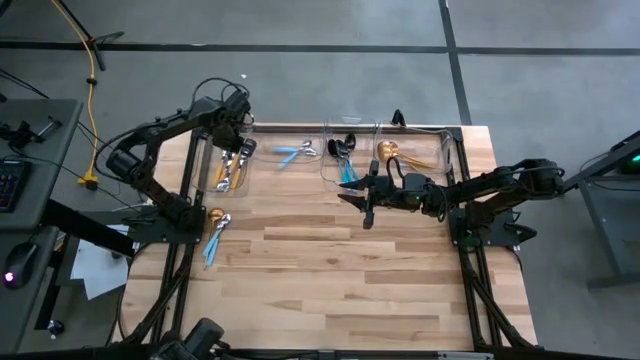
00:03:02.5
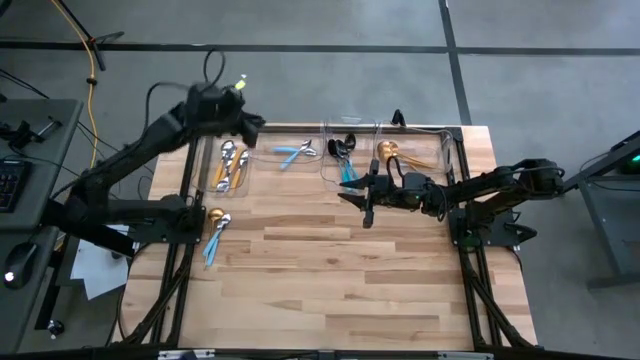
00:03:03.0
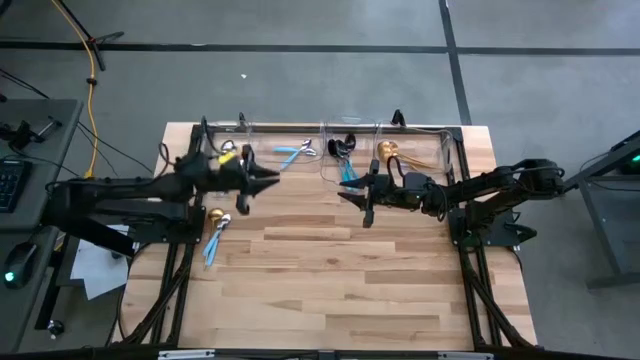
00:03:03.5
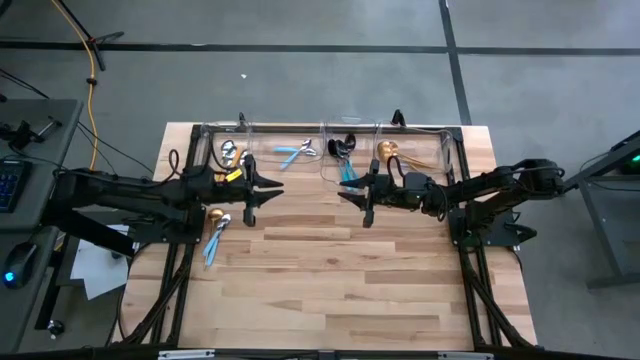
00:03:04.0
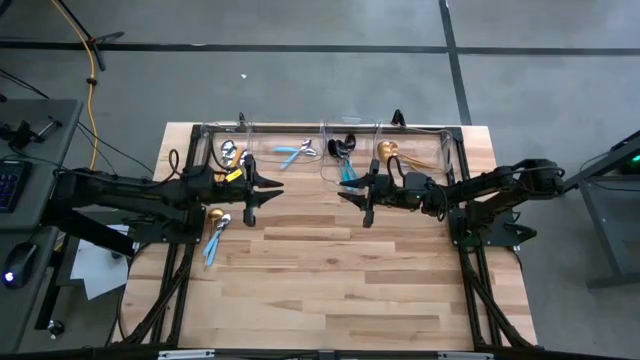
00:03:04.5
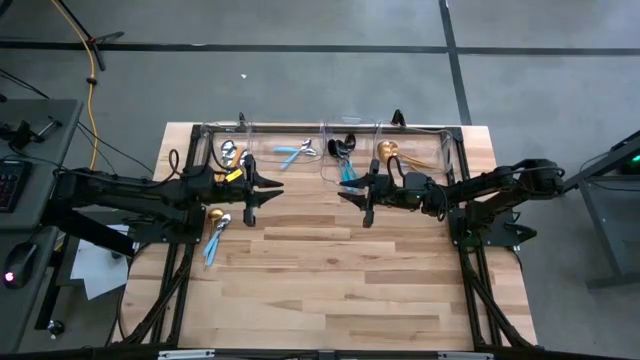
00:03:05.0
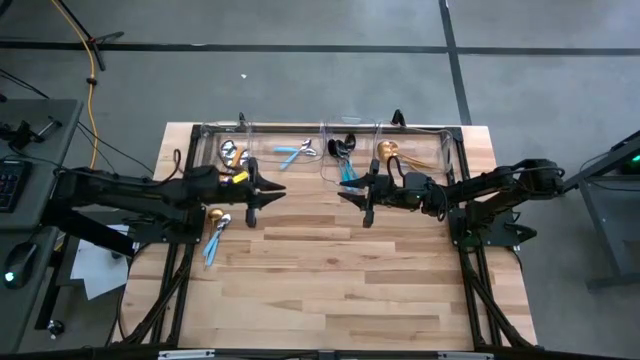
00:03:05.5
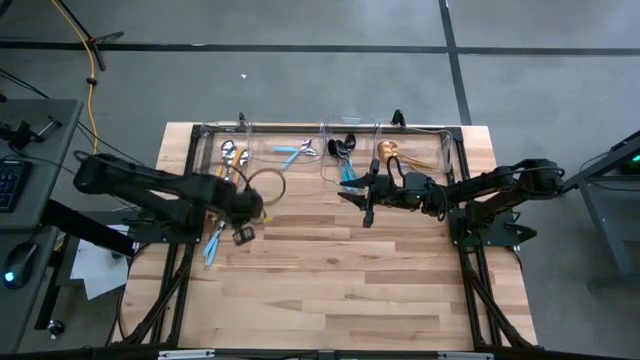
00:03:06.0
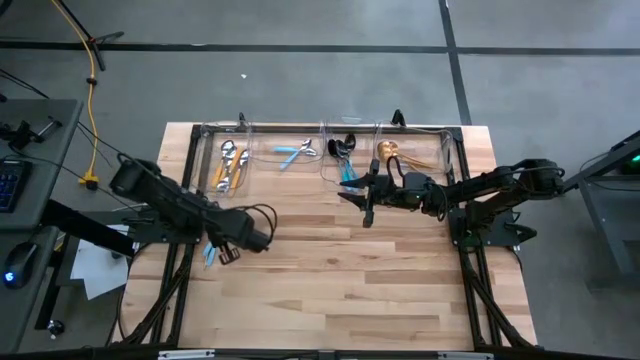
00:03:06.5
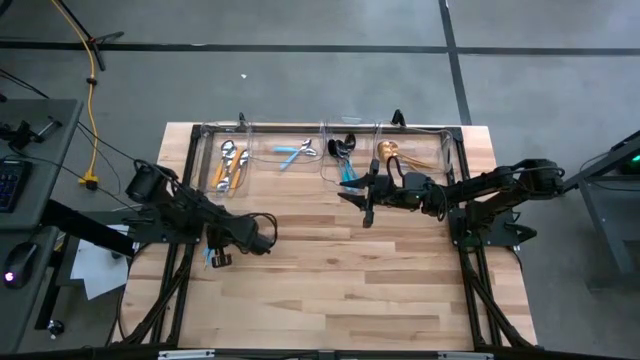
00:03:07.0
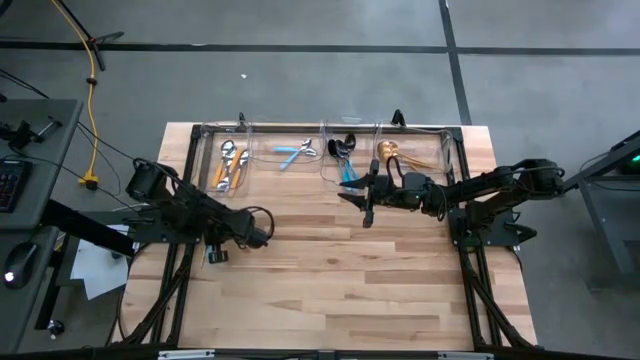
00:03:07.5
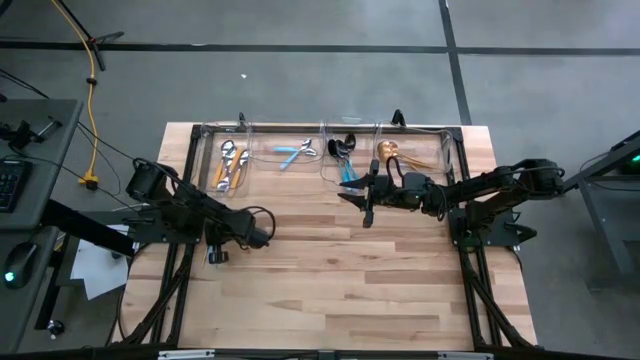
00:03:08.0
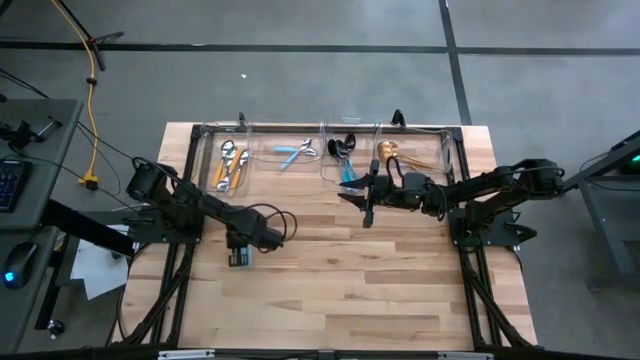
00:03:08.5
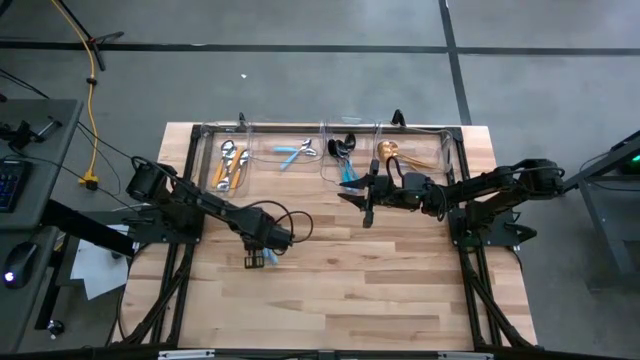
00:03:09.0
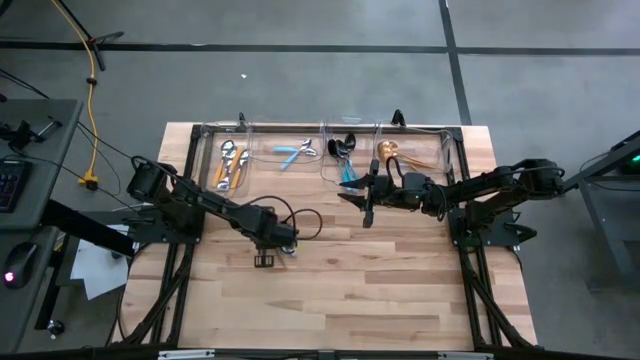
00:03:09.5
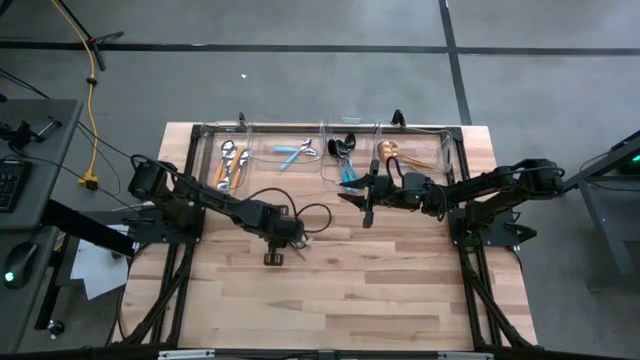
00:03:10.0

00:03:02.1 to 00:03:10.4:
Task: Sort silverware by color (type)
Move the spoons into the center of the table

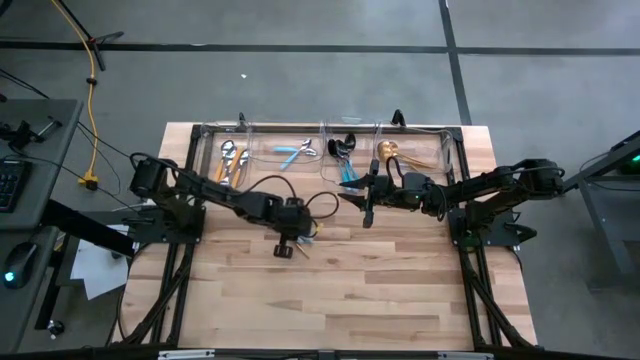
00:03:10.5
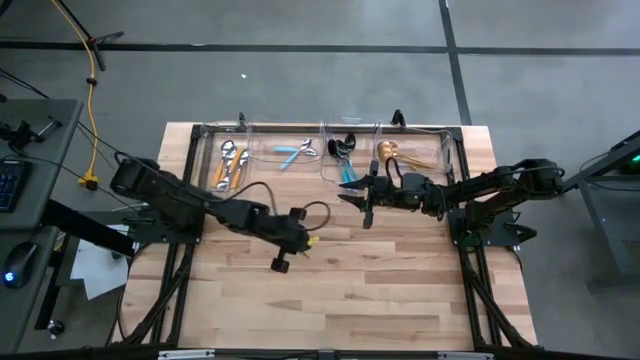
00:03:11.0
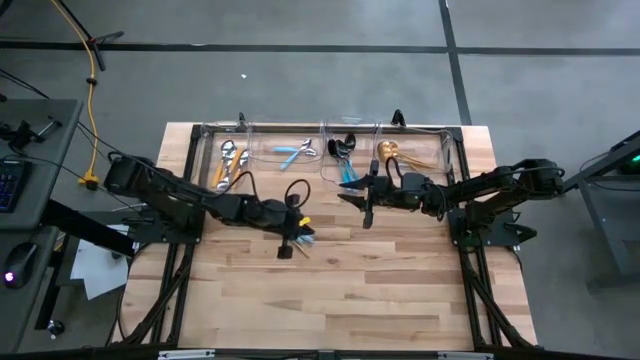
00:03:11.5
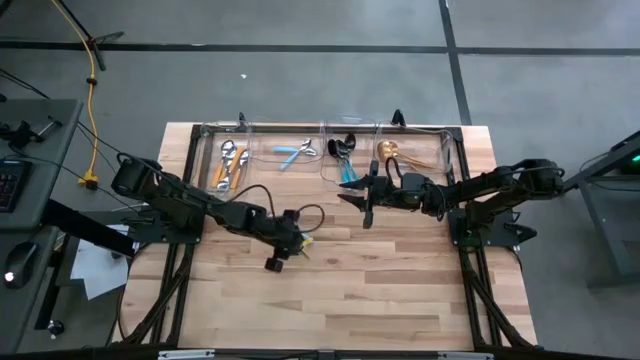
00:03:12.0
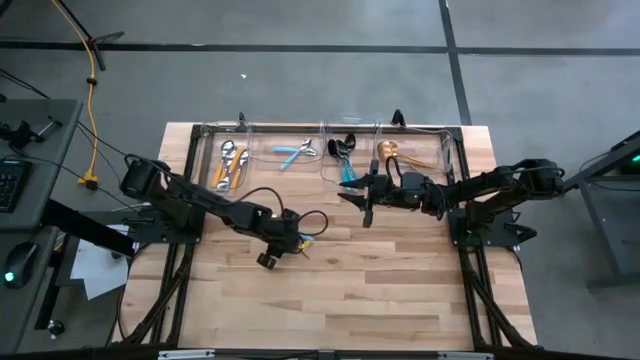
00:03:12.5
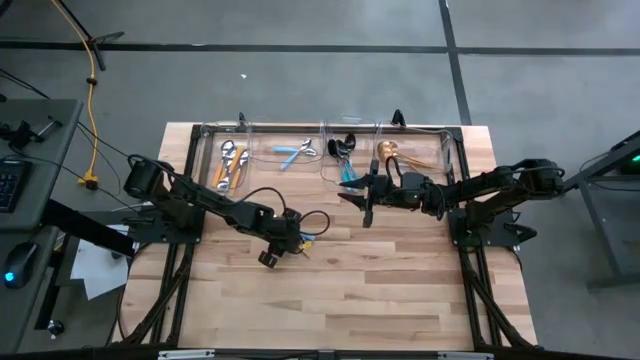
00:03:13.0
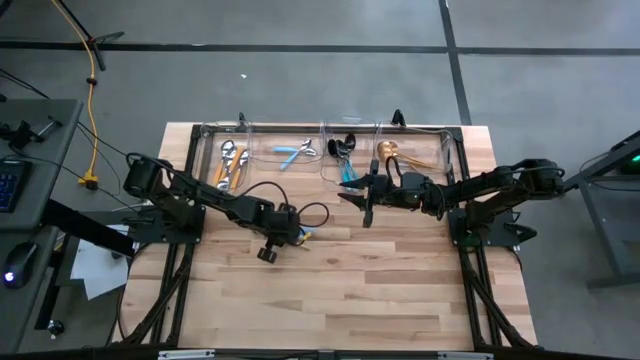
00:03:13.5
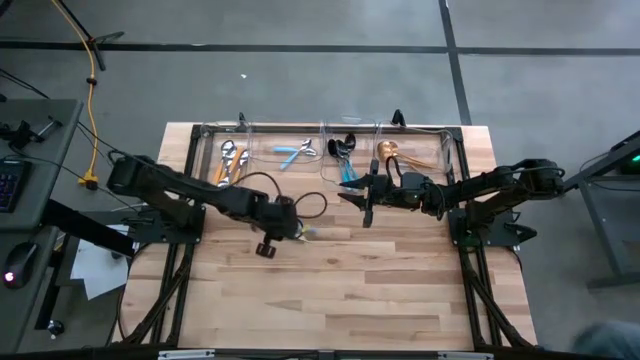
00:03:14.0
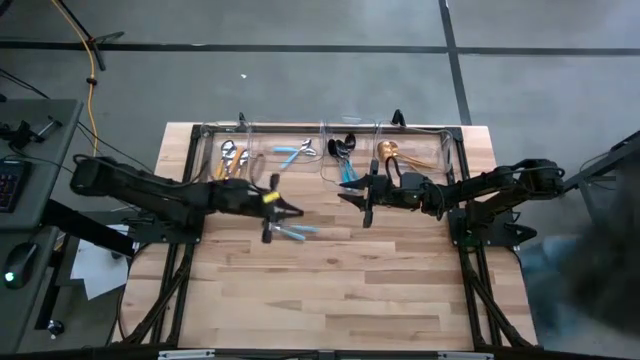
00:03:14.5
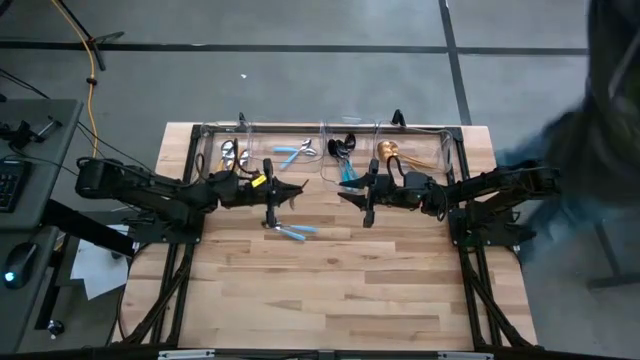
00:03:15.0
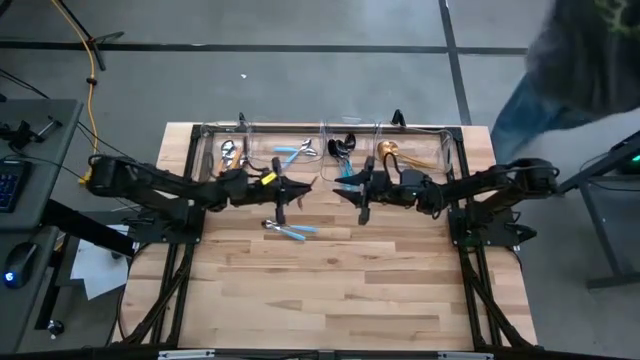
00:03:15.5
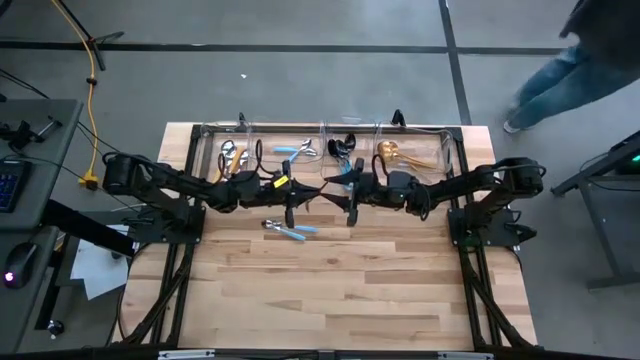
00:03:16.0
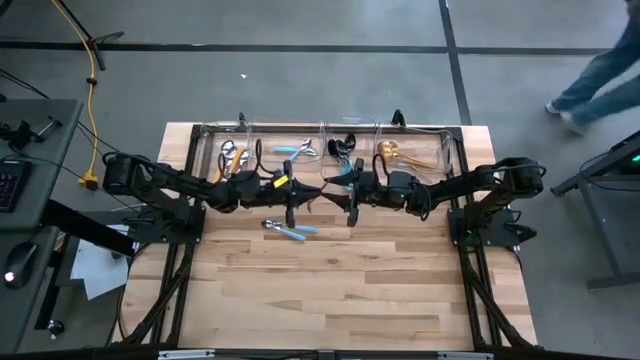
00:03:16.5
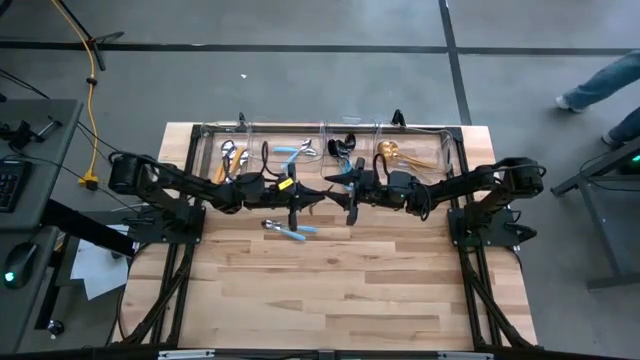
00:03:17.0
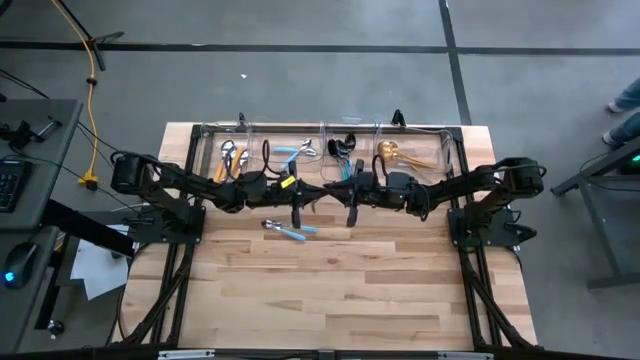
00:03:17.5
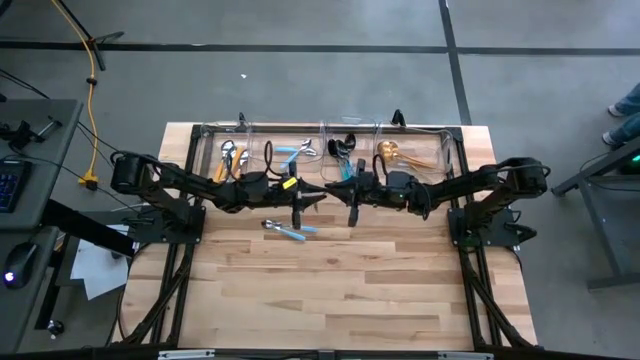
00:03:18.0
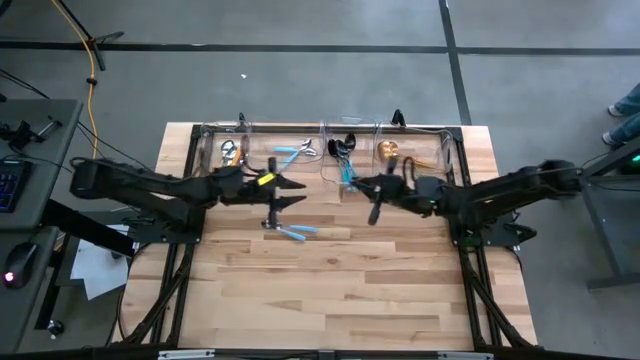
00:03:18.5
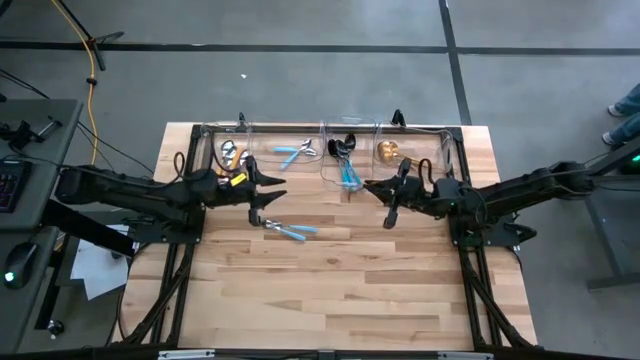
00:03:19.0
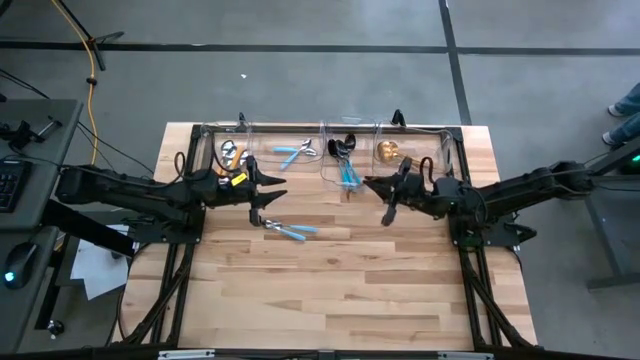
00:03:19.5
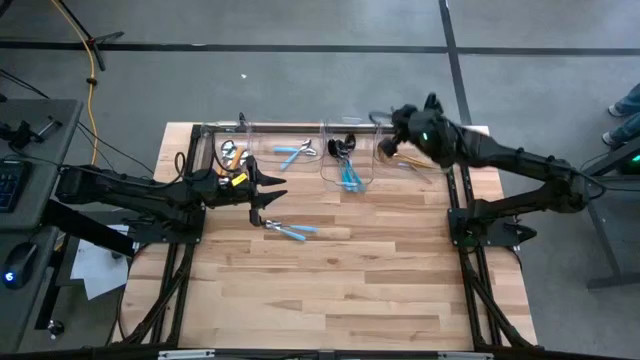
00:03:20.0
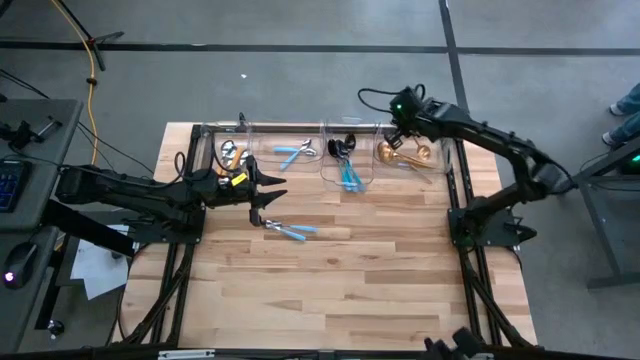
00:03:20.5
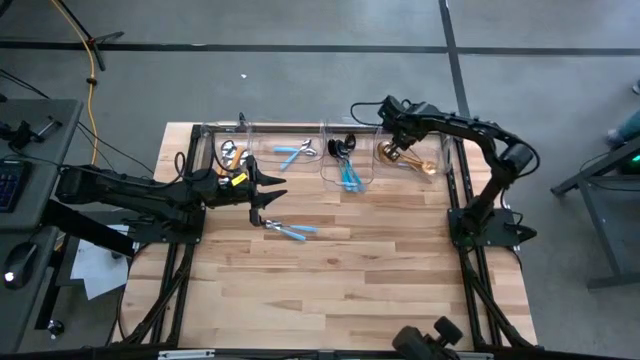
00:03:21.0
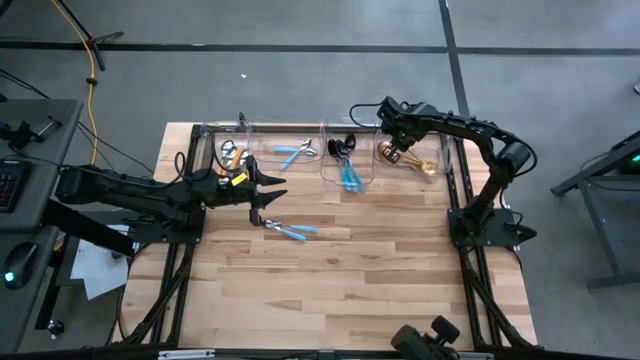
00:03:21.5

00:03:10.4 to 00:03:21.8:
Put the blue spoon into the right transparent bin

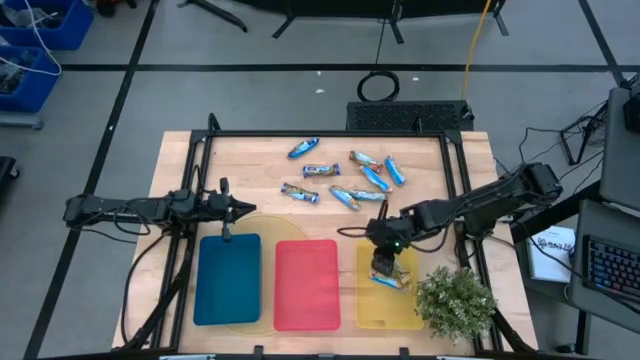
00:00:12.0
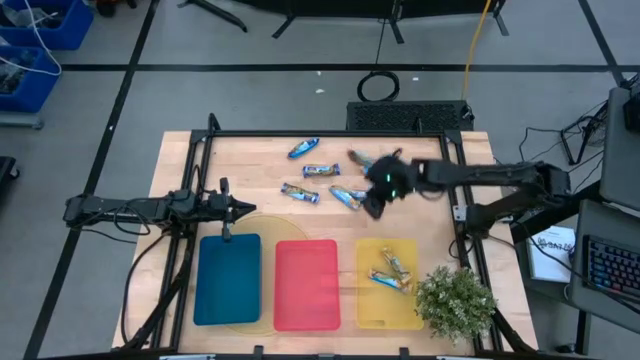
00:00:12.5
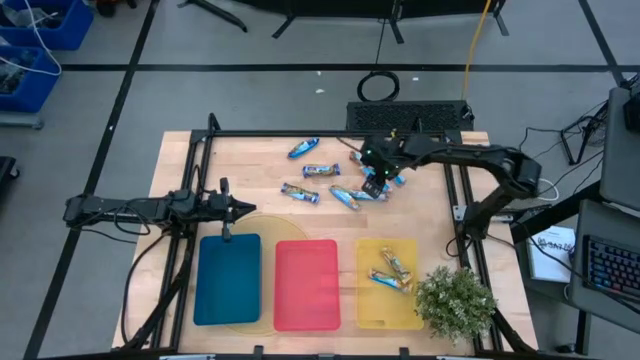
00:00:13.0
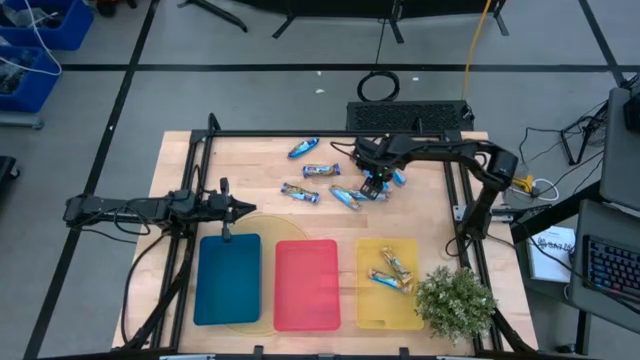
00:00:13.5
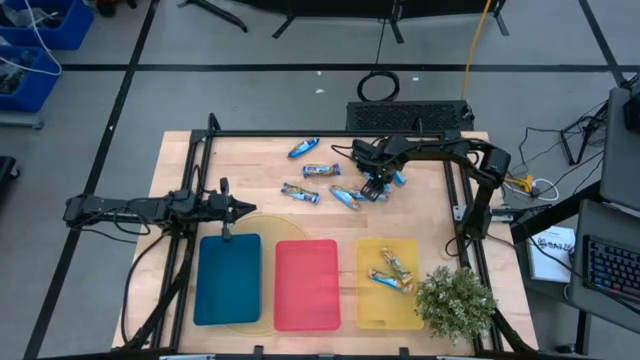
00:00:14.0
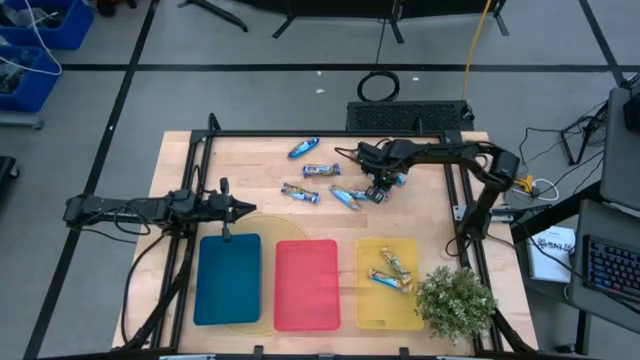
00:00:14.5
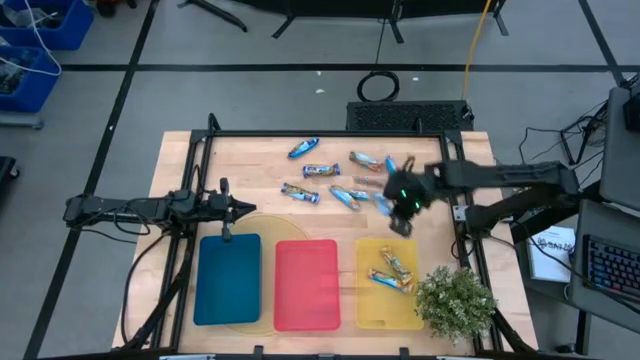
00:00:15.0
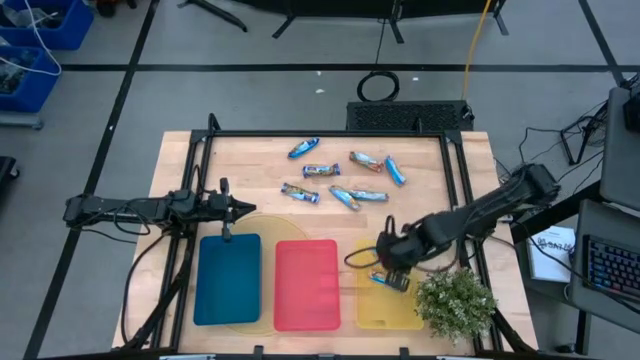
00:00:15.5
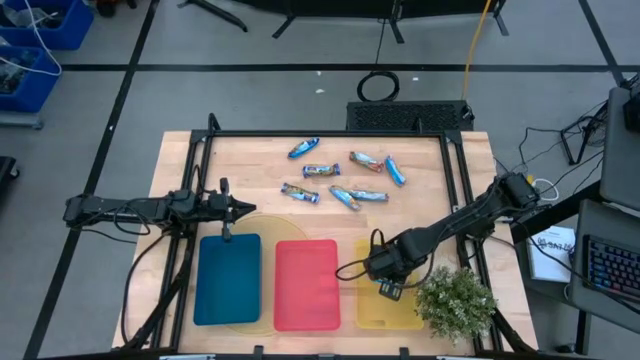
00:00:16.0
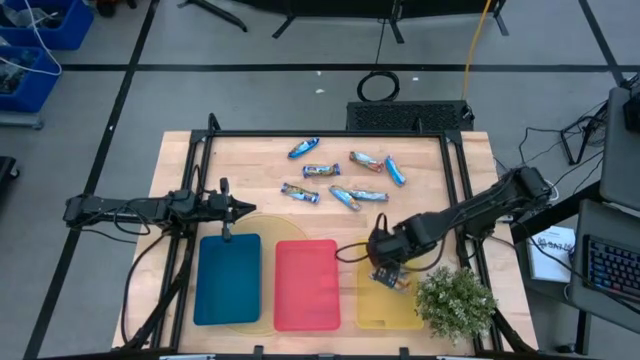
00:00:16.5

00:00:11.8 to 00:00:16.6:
Task: Pick and place Granola Bars by type
Put the top yellow granola bar into the yellow bin
